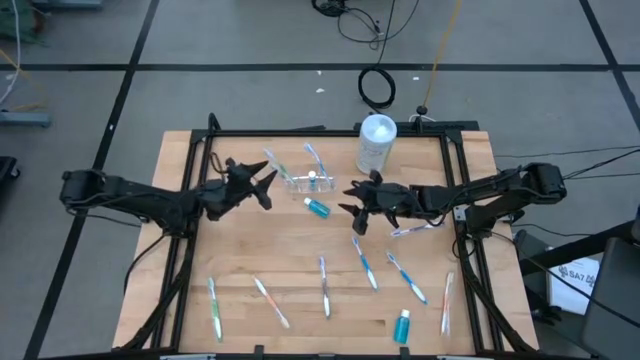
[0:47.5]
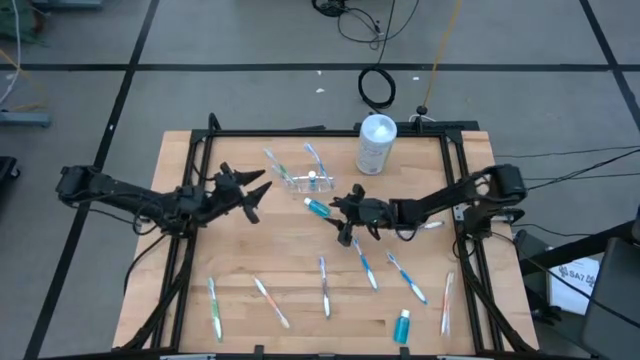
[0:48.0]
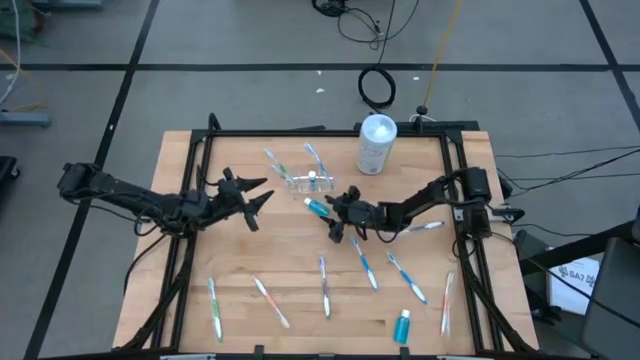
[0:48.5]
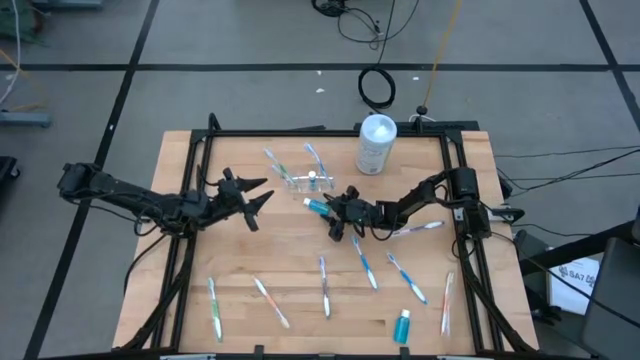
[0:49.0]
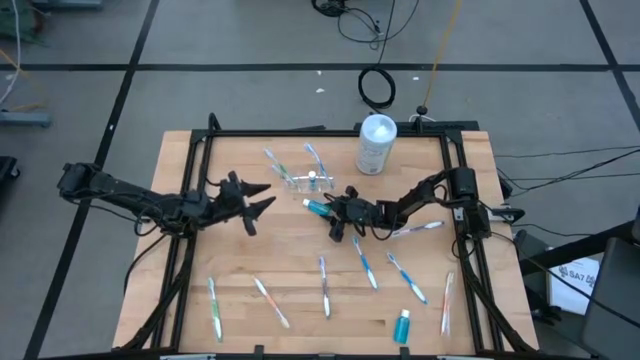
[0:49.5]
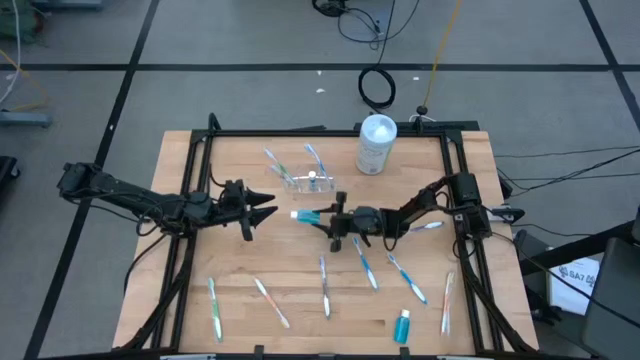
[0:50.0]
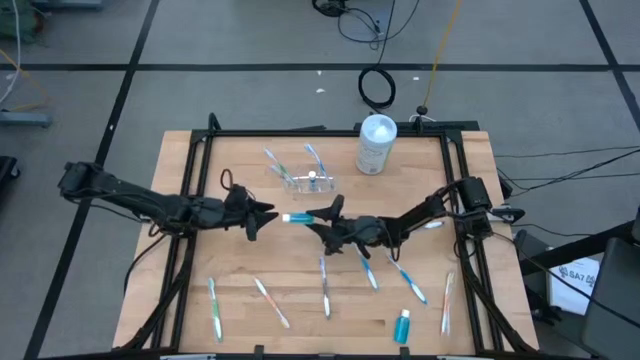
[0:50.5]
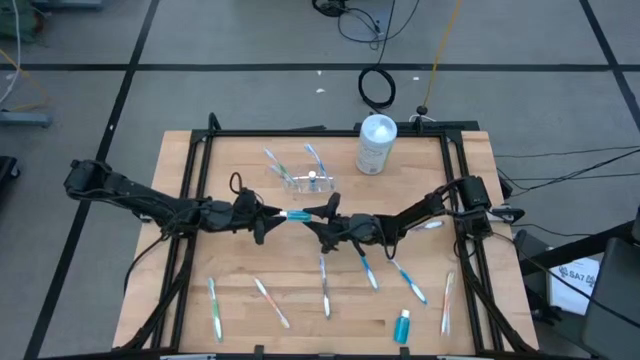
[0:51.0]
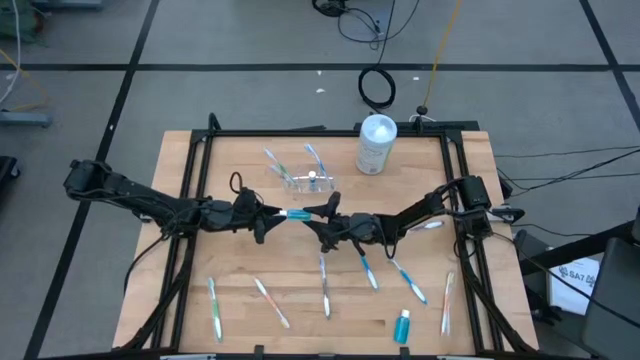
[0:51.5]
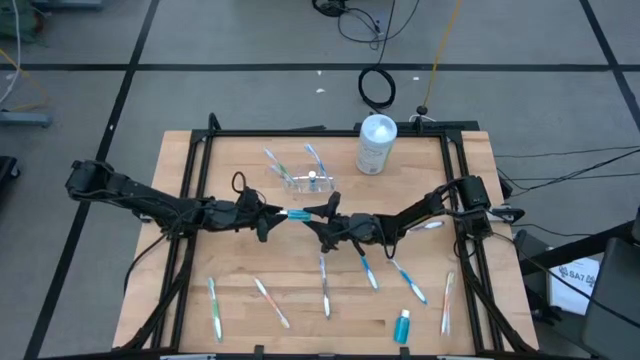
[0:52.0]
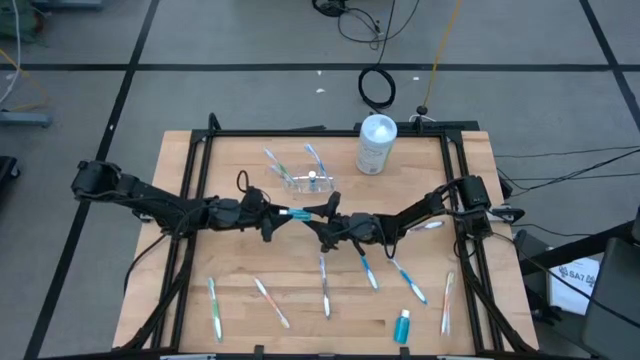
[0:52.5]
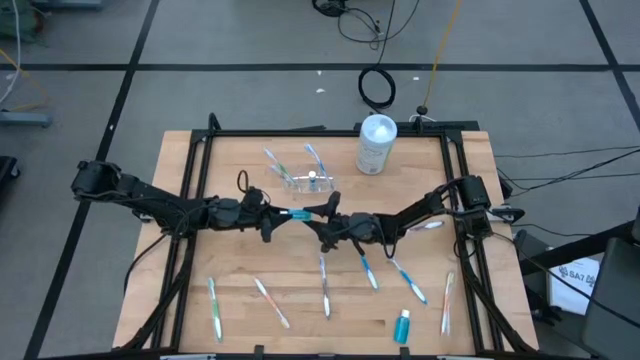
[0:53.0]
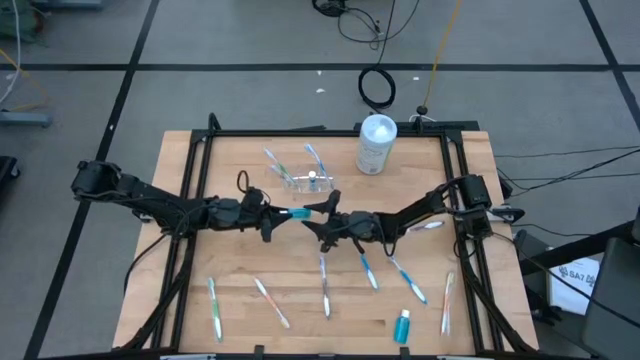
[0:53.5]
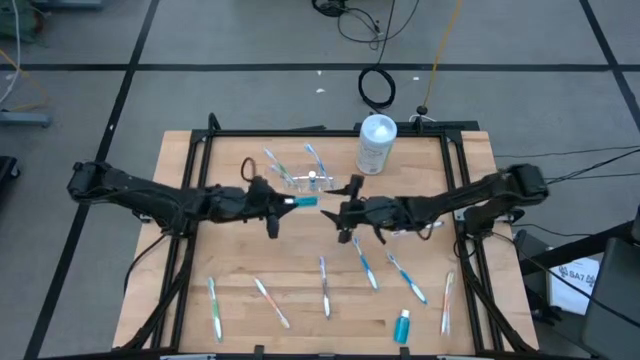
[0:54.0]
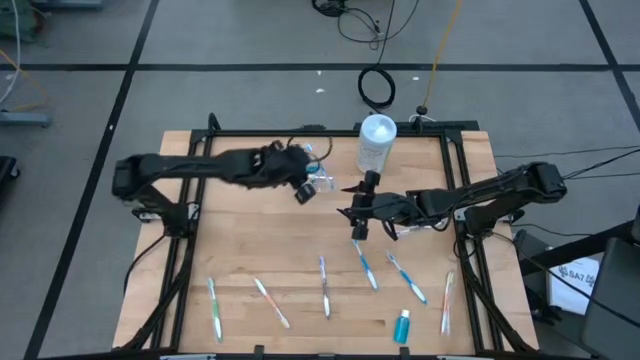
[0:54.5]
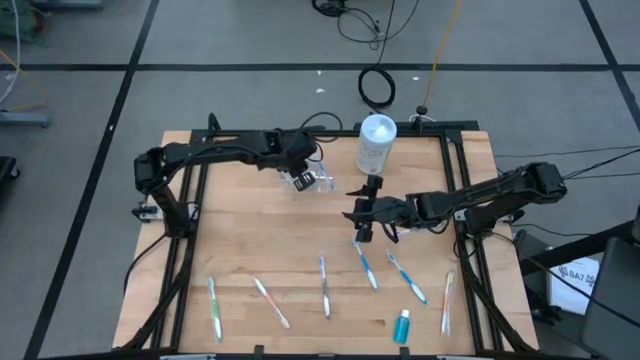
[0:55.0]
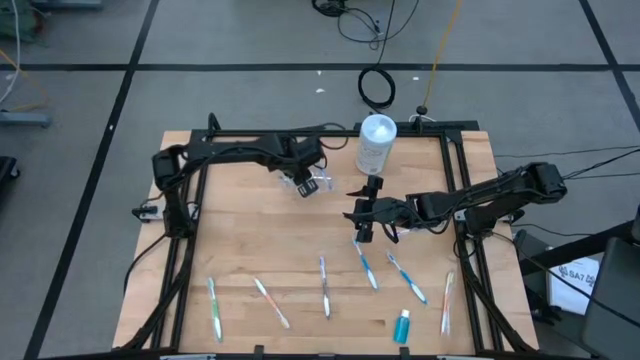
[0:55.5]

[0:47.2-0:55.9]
Task: Pick & Place toothbrushing station
Put the top mouthwash bottle in the middle compartment of the transparent organizer

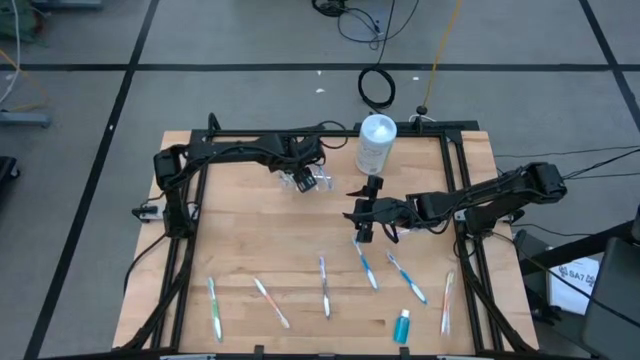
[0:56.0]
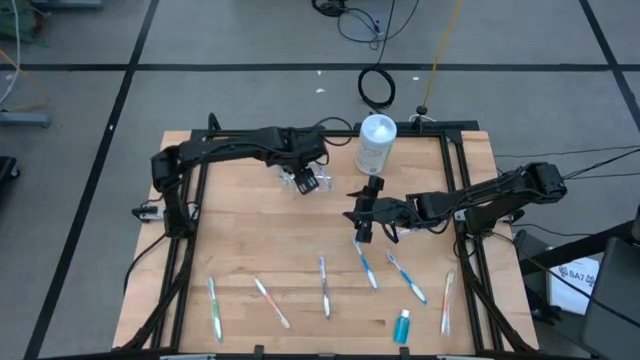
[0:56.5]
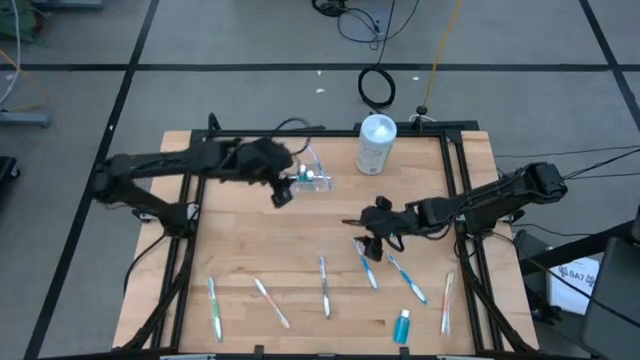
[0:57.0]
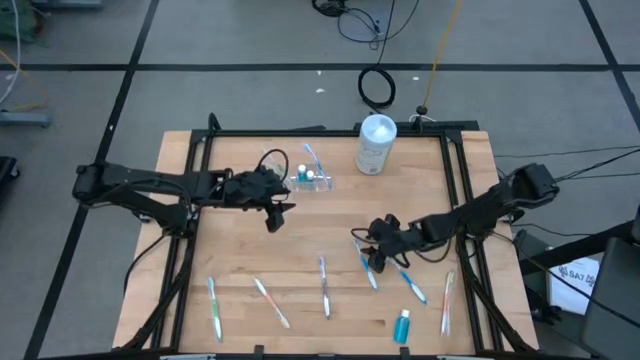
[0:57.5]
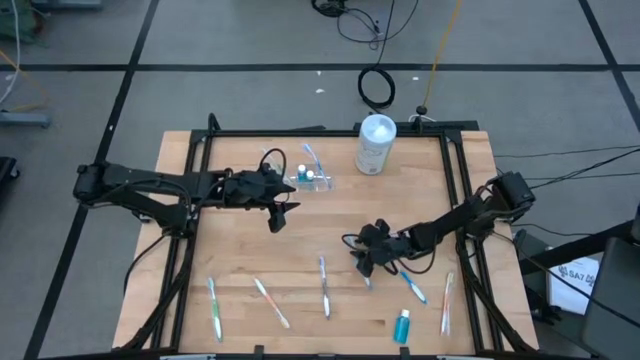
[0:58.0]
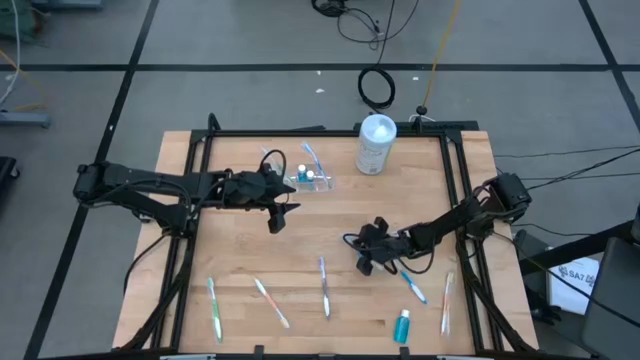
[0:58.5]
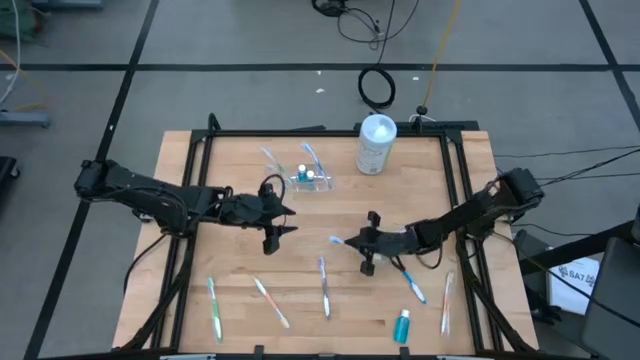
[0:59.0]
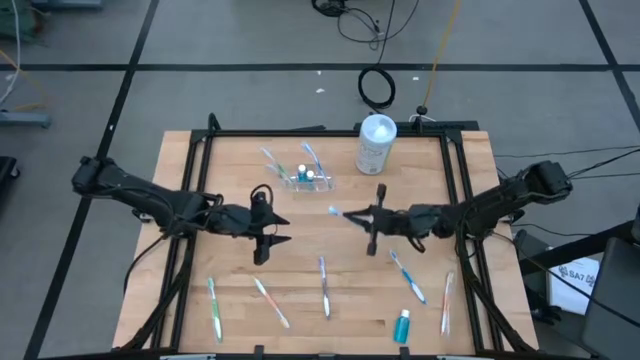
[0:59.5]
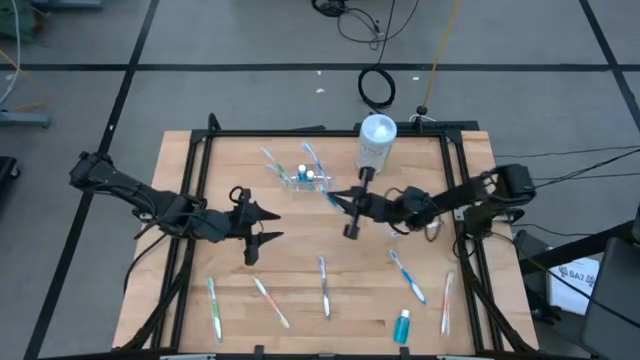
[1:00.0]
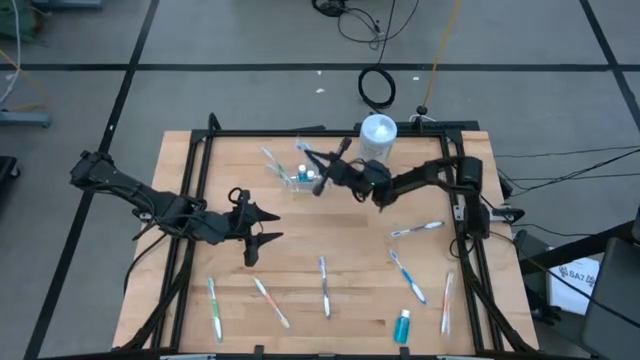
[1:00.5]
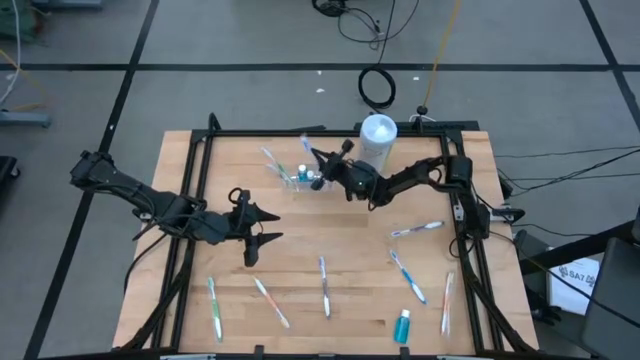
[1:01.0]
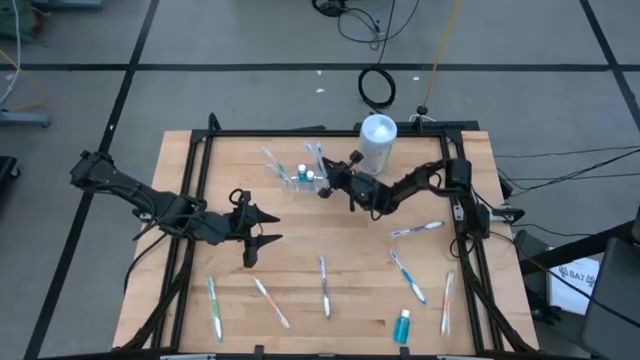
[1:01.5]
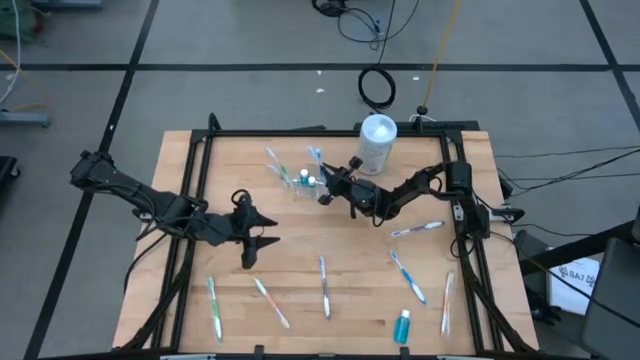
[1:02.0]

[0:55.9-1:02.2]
Put the left blue toothbrush in the right compartment of the transparent organizer

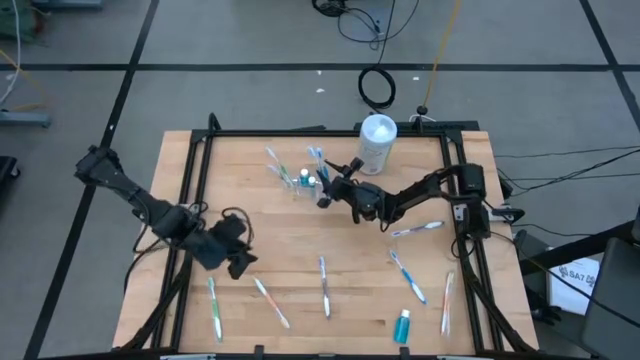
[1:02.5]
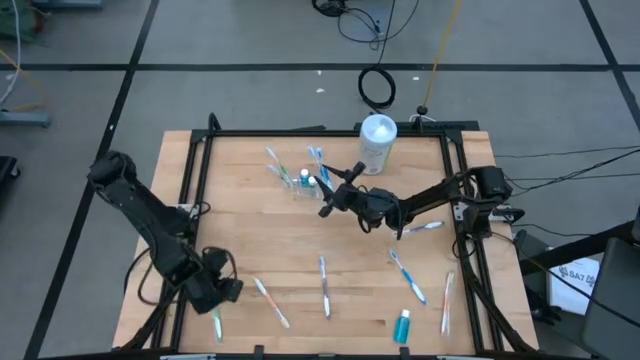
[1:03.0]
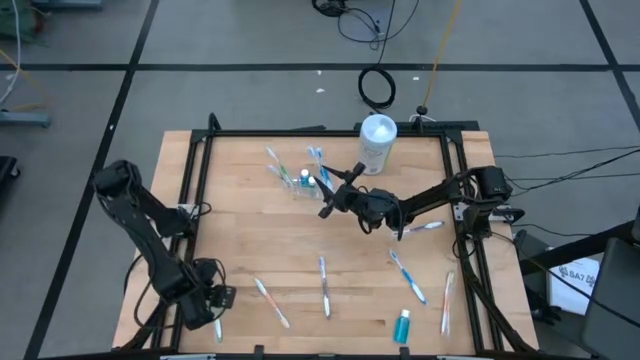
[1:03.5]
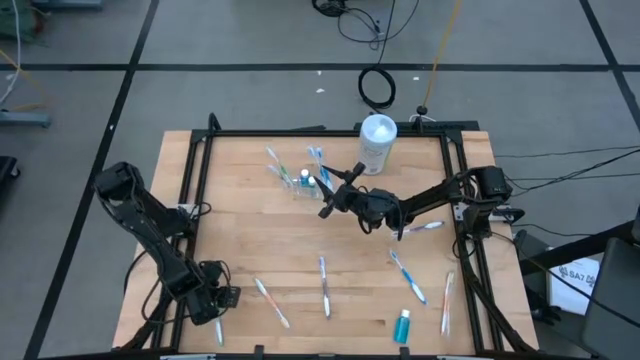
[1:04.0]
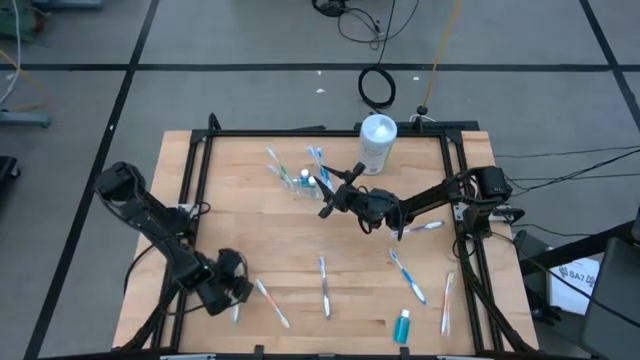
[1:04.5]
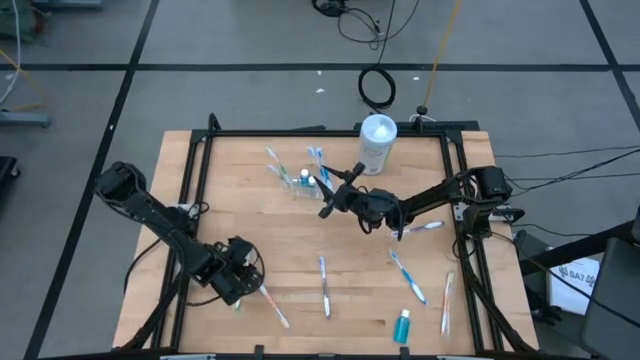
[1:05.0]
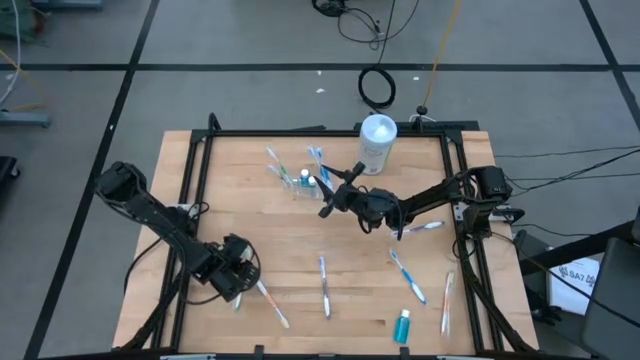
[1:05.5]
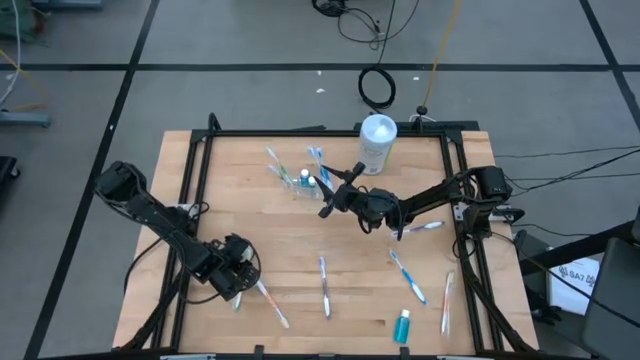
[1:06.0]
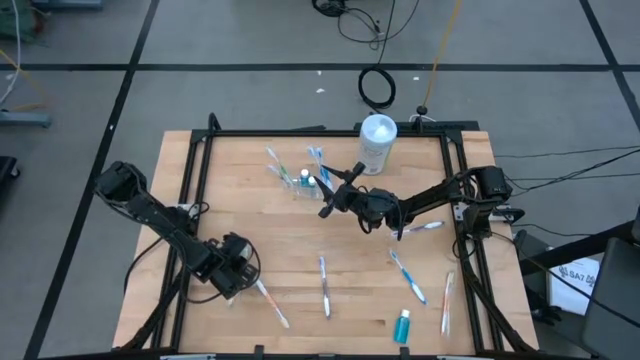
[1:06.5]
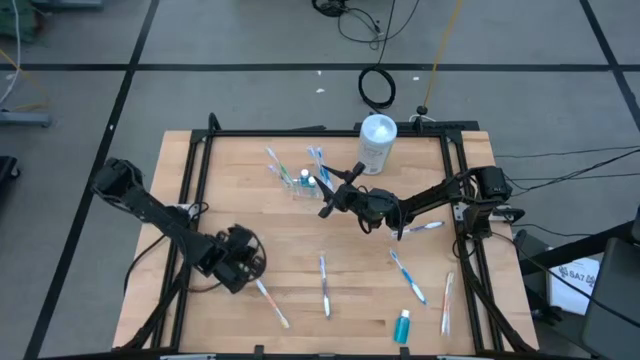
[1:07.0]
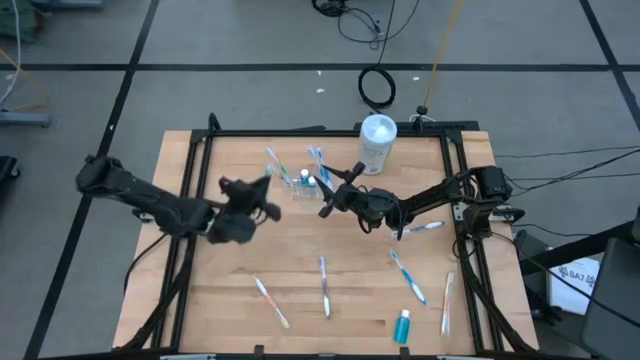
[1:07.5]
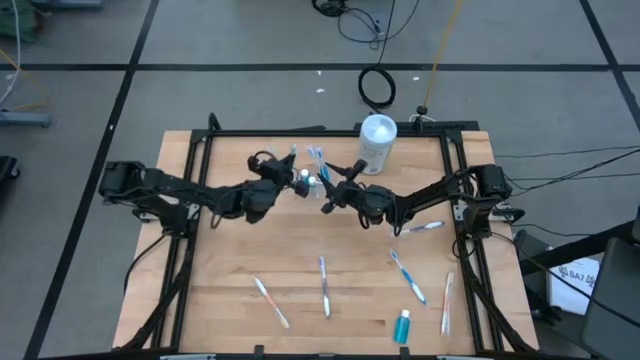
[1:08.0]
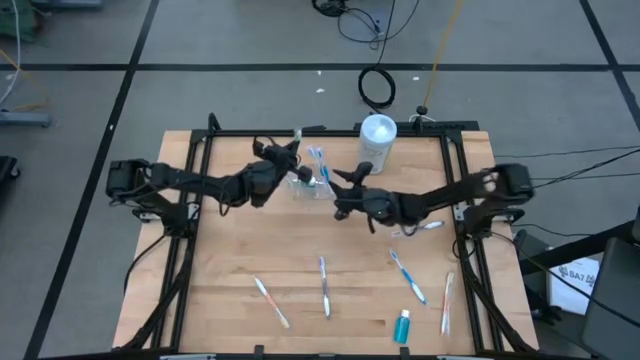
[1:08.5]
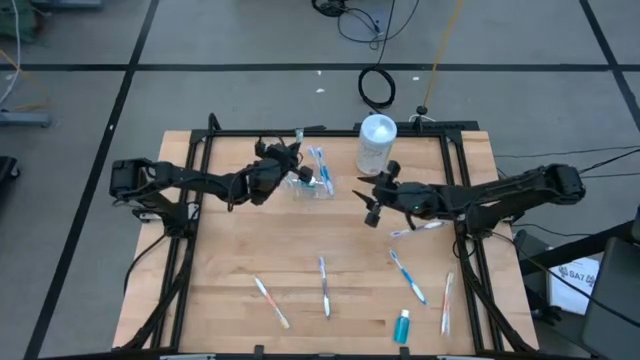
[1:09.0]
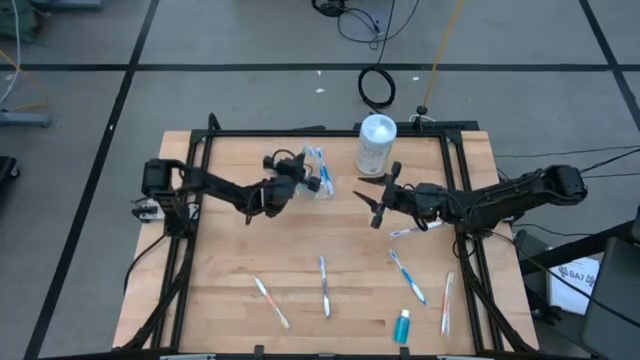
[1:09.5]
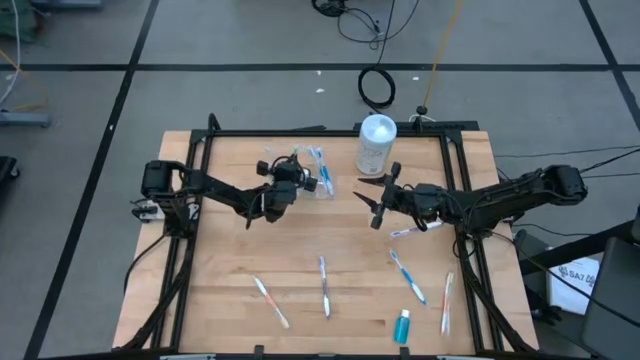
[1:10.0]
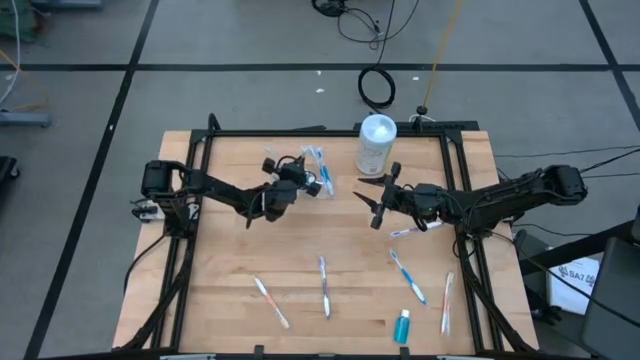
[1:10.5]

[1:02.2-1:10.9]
Put the green toothbrush in the left compartment of the transparent organizer
